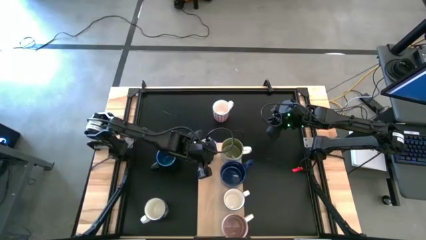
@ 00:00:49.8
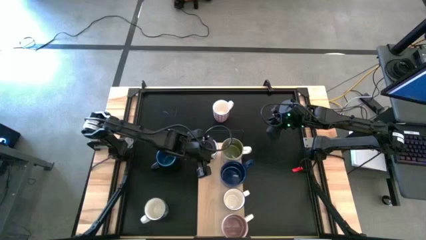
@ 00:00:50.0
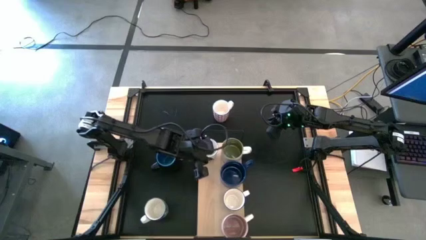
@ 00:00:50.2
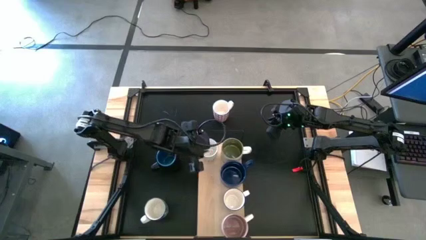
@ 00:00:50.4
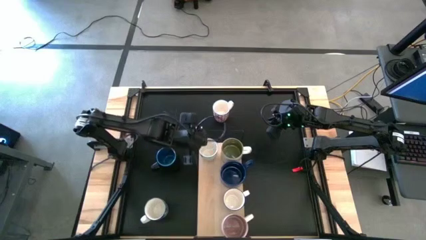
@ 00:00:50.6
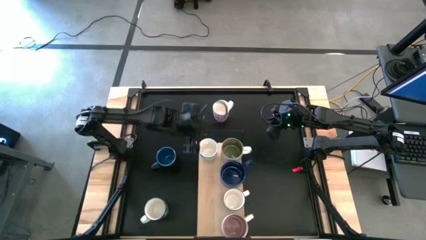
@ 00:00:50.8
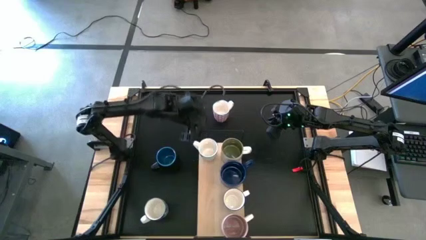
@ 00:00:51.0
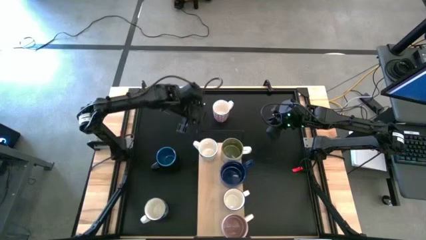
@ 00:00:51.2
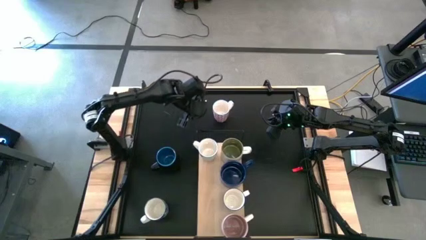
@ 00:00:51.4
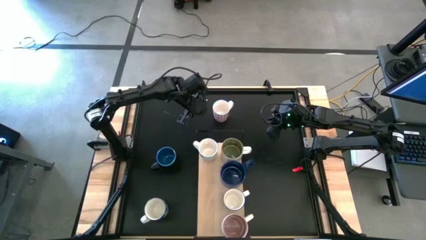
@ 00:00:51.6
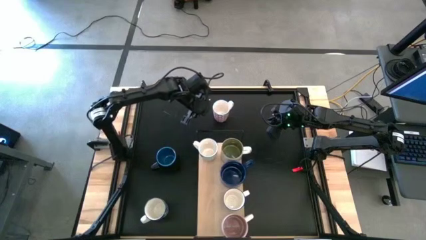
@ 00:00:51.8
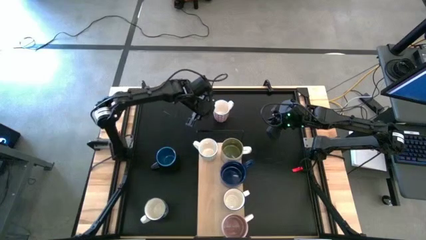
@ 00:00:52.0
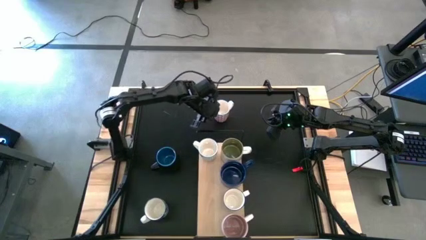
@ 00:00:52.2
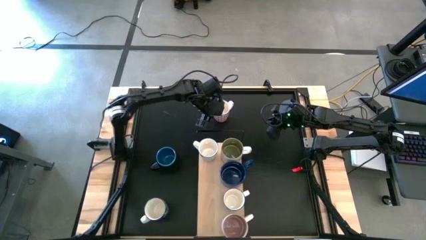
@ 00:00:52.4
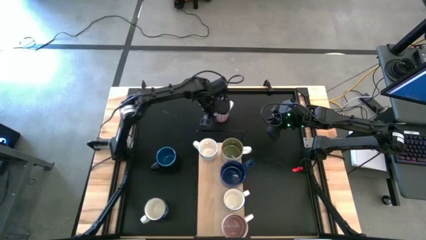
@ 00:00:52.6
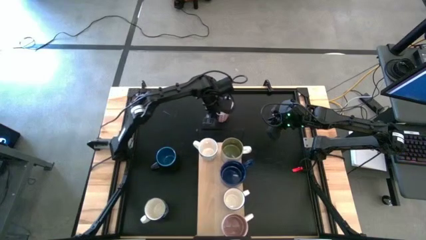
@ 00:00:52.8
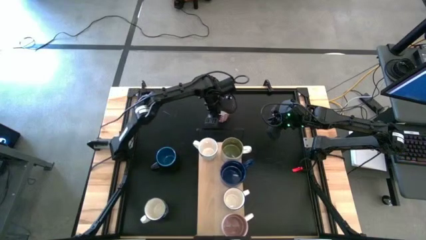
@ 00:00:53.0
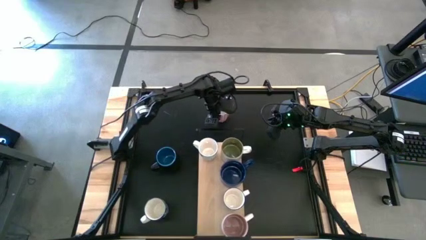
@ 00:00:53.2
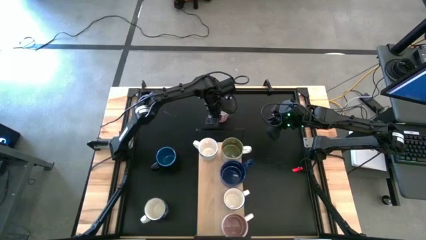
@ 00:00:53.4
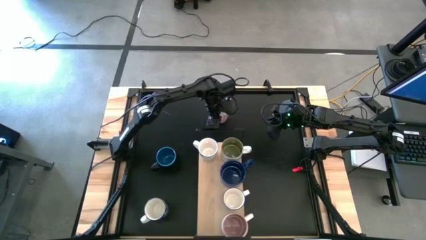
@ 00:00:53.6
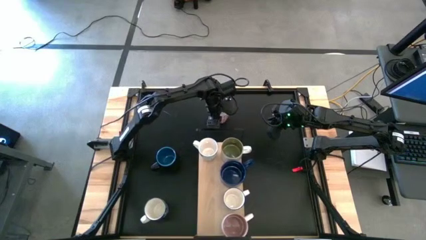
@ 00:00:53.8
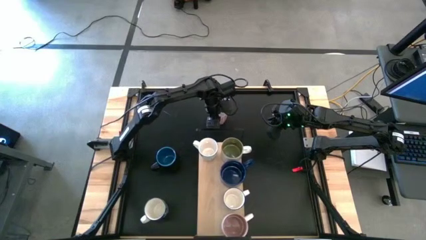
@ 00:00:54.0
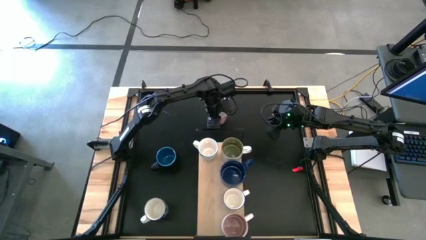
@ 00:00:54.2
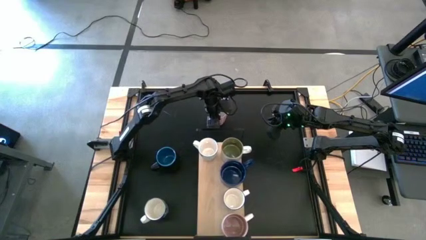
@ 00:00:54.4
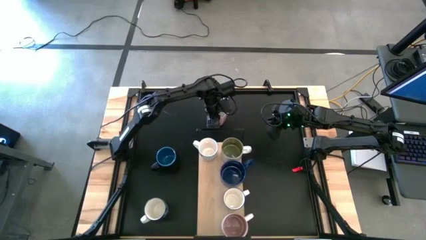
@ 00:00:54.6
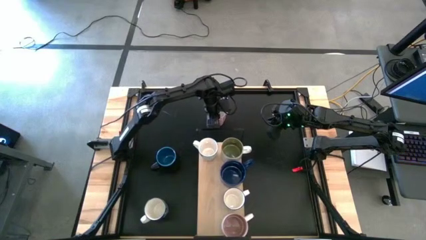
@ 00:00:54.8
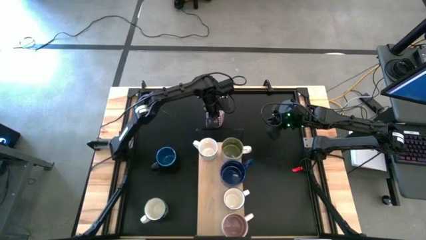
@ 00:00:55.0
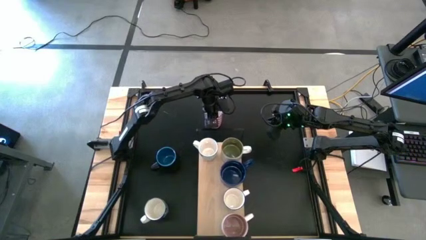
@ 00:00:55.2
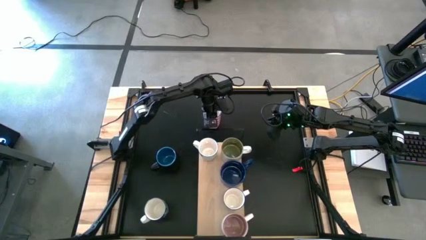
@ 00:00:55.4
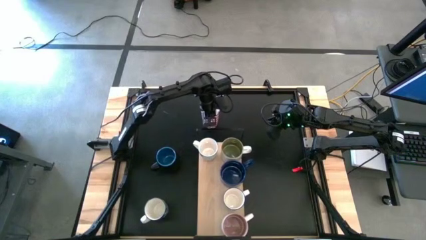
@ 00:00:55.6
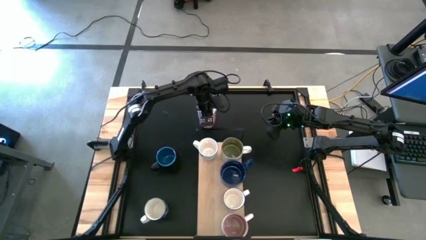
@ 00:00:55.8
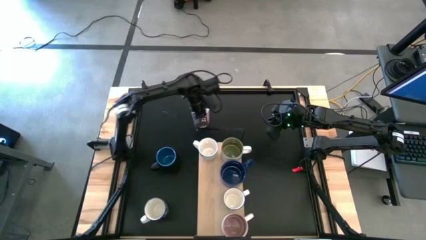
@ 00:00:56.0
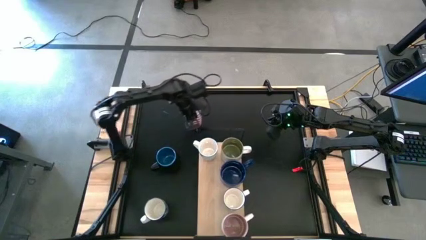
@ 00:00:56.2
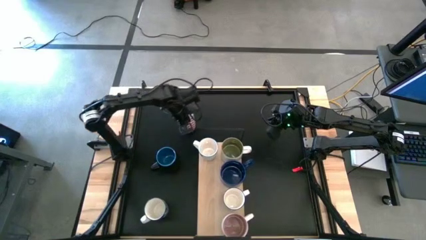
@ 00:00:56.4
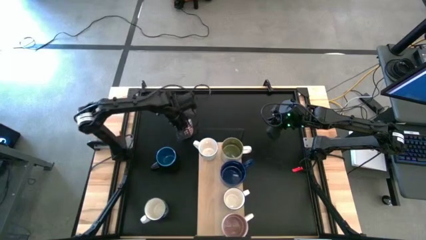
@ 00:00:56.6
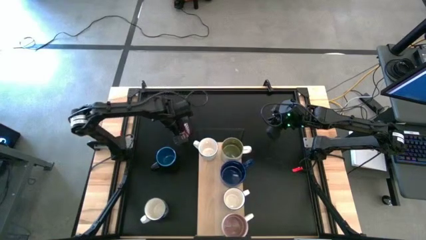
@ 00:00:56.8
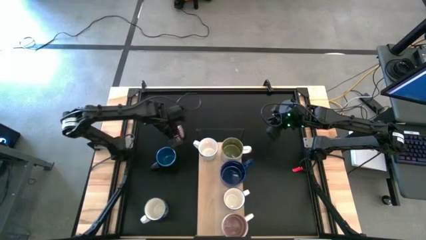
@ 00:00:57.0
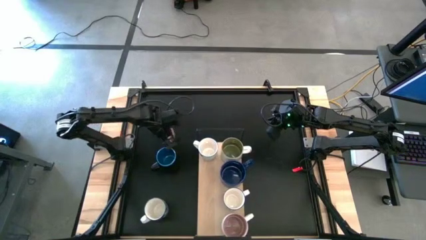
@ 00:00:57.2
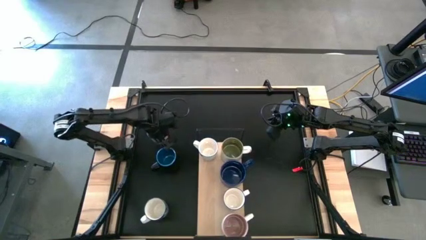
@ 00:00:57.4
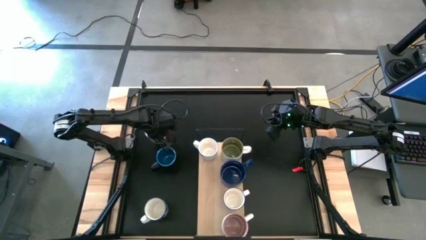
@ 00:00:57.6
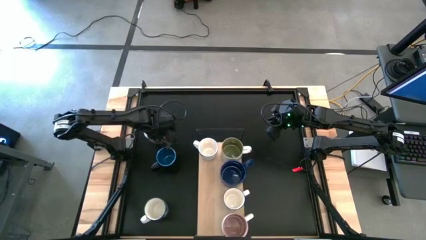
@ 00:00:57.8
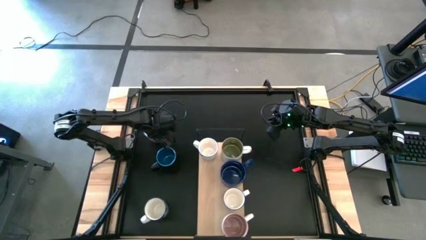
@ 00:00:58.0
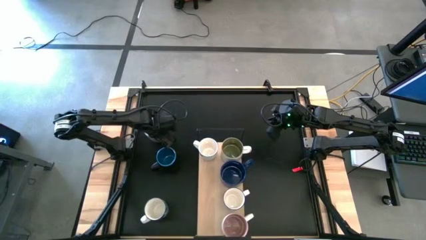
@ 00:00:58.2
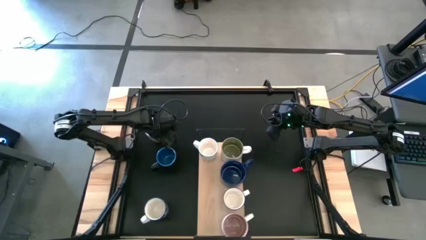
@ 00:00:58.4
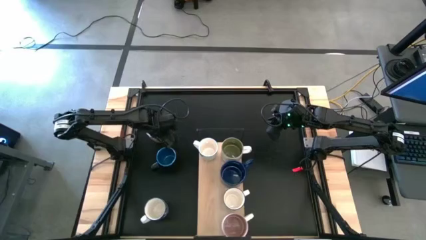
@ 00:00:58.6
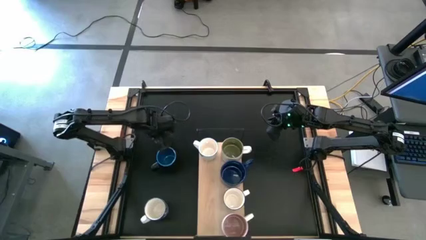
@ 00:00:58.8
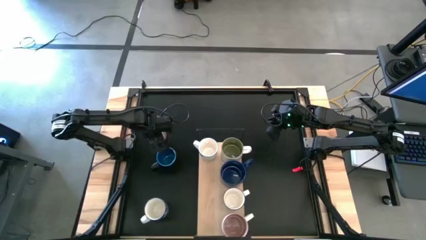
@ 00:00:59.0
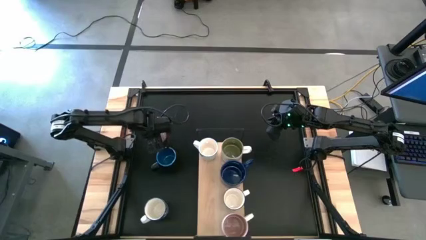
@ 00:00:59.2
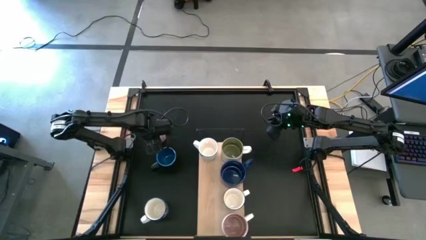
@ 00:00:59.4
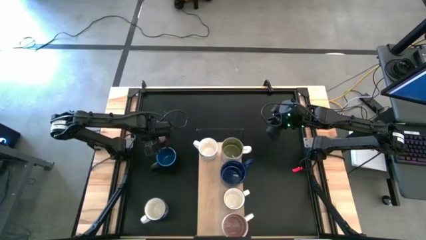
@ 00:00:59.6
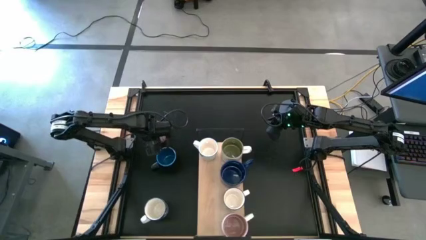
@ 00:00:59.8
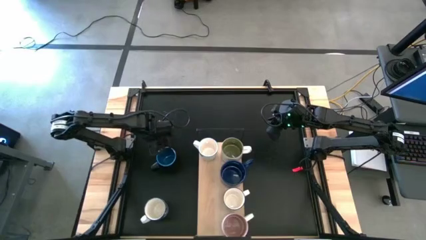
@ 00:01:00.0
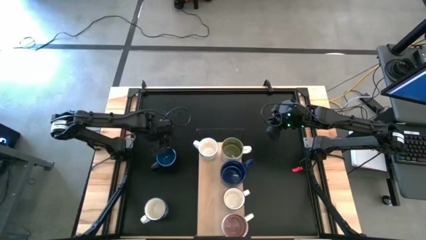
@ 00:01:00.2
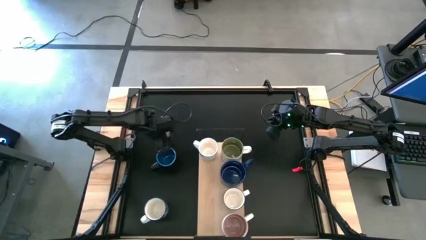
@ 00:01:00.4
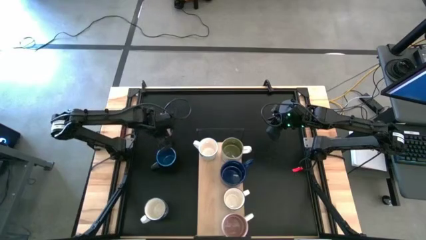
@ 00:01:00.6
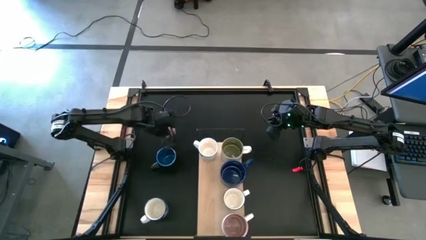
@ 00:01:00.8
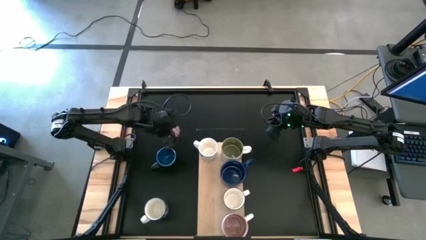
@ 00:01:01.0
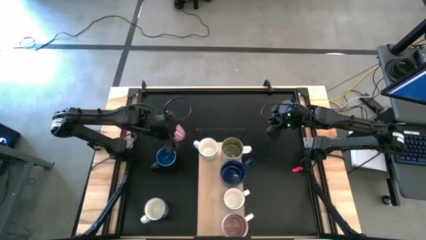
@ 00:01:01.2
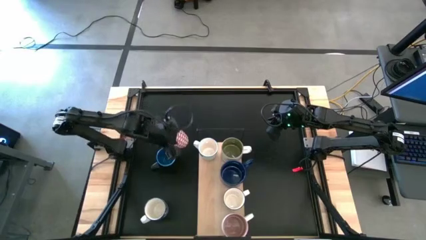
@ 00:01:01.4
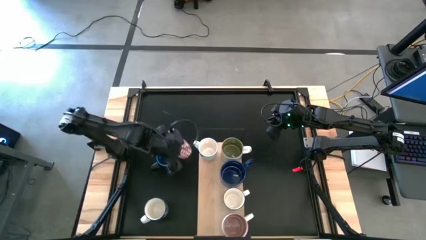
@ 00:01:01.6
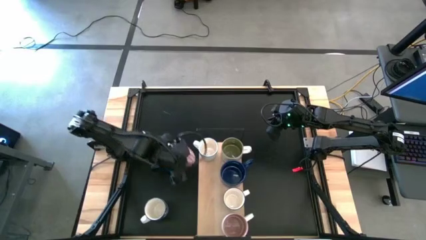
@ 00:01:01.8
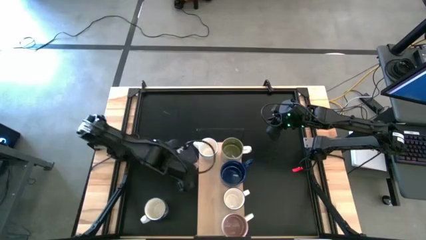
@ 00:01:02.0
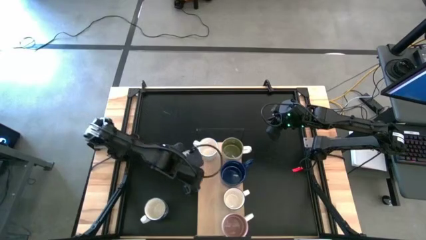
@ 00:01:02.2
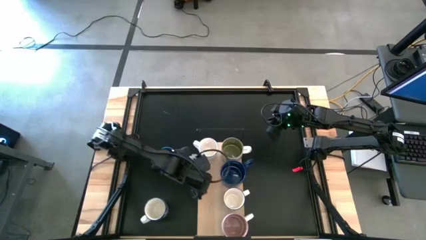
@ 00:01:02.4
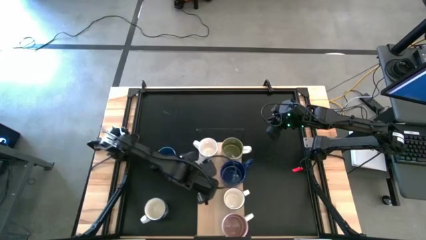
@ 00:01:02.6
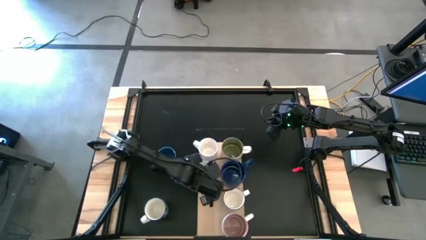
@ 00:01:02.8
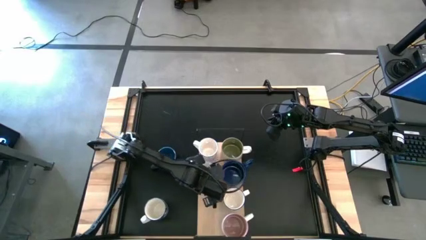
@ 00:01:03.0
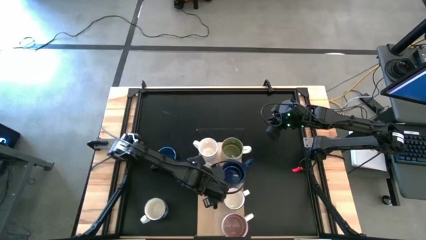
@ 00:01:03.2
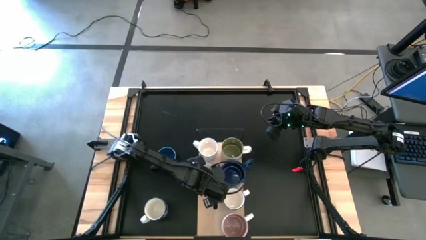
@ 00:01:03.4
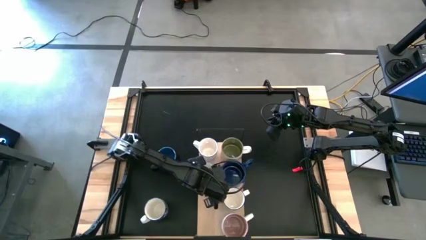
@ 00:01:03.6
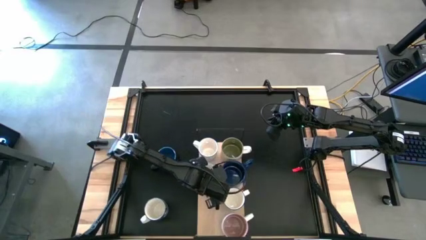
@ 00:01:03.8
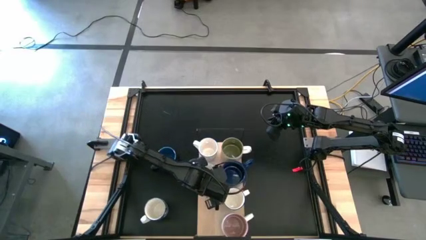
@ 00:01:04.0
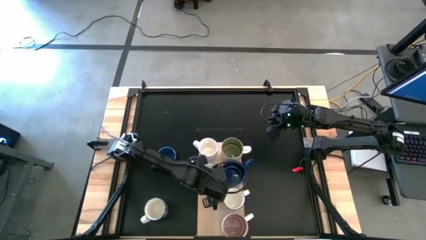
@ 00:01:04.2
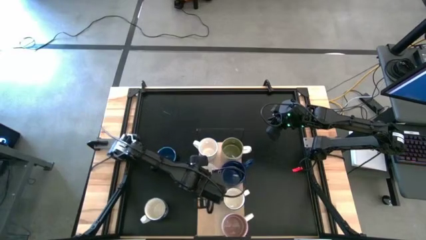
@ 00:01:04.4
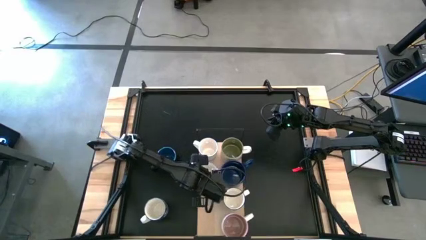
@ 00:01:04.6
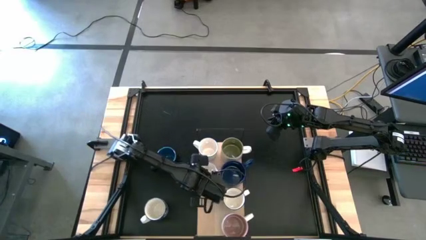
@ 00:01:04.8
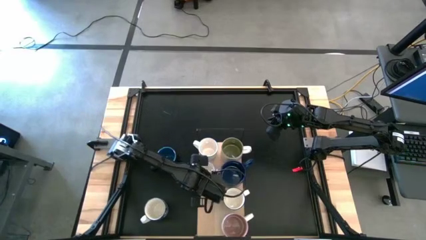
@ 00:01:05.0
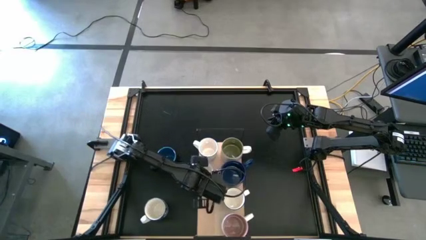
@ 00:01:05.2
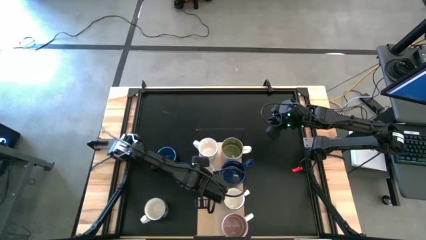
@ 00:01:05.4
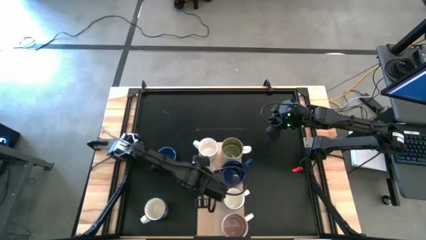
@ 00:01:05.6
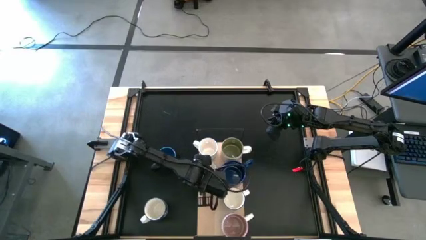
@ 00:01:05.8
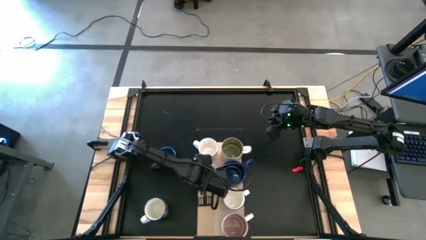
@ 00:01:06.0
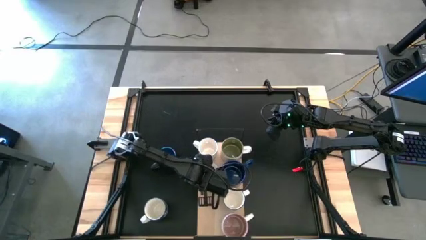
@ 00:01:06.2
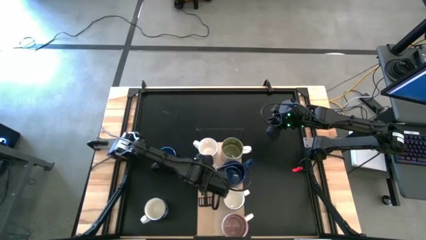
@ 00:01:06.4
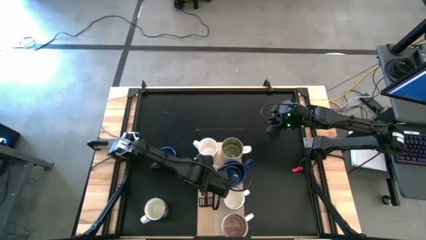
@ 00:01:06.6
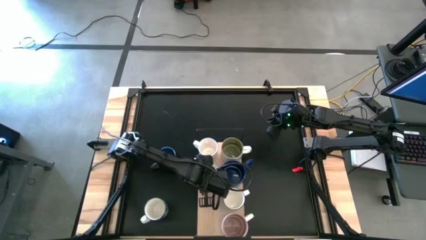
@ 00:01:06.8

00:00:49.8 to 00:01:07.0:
Task: Place coffee mugs
Put the red patterned mug on the shelf
